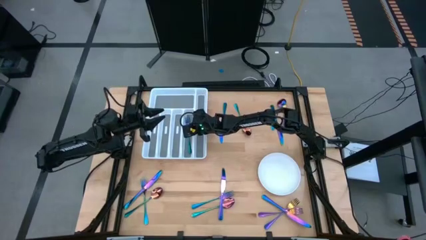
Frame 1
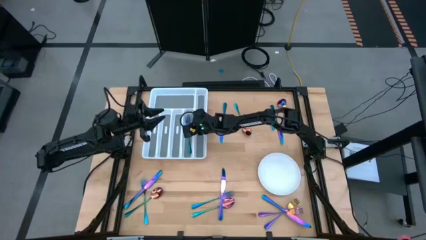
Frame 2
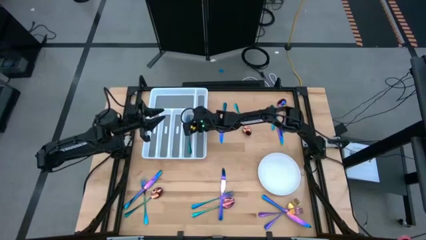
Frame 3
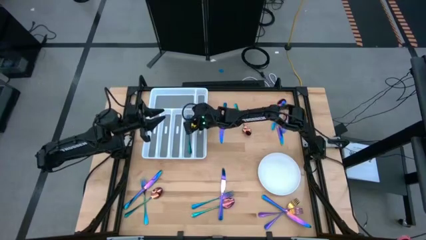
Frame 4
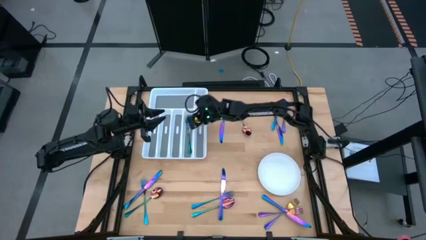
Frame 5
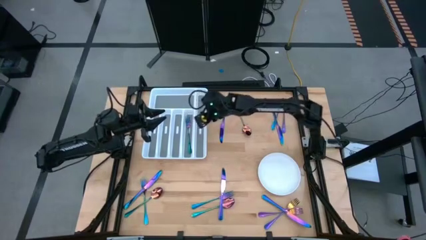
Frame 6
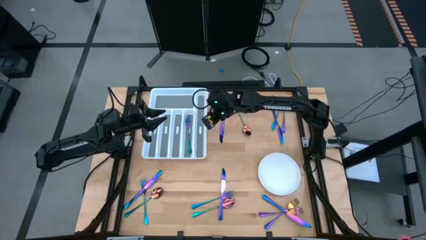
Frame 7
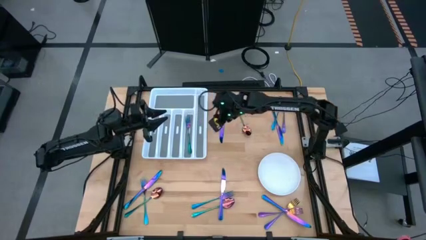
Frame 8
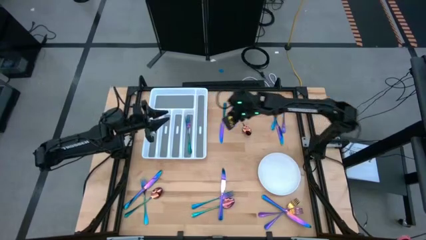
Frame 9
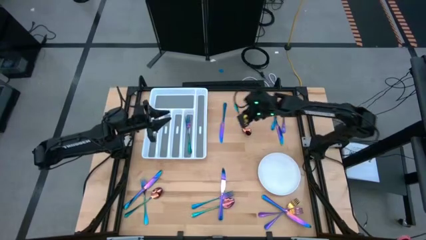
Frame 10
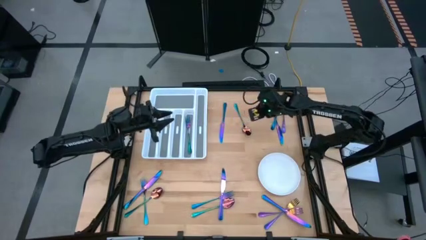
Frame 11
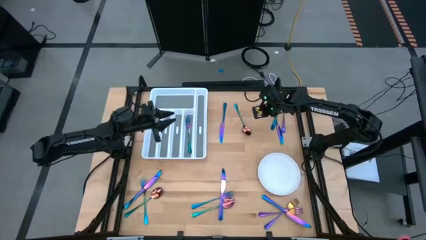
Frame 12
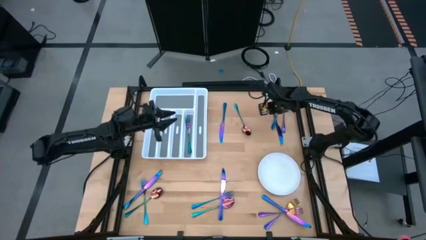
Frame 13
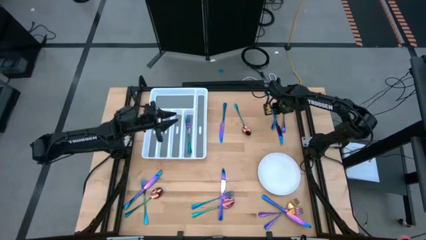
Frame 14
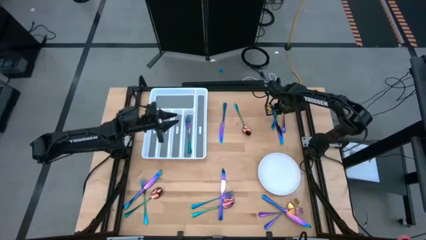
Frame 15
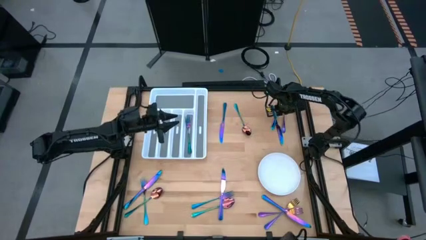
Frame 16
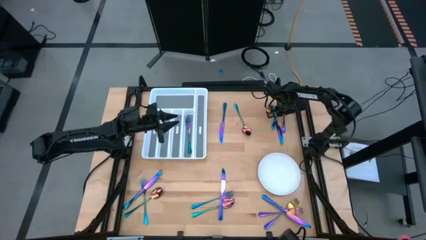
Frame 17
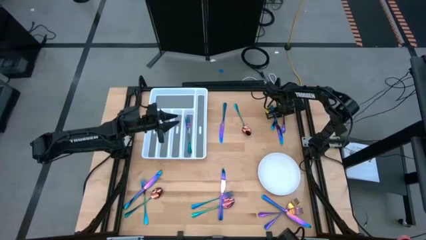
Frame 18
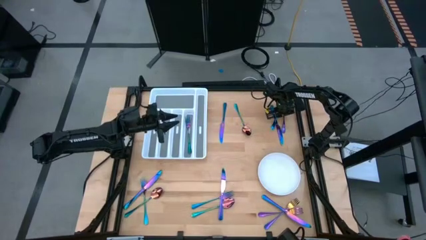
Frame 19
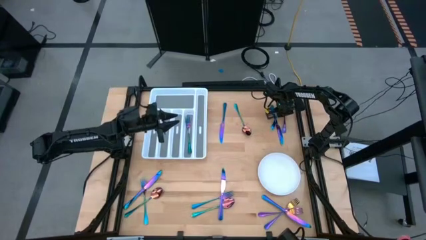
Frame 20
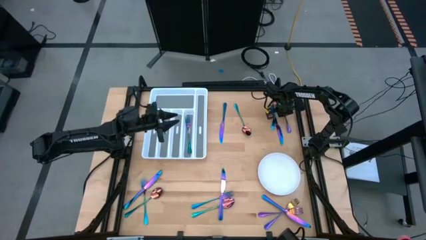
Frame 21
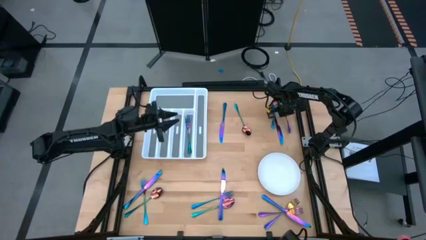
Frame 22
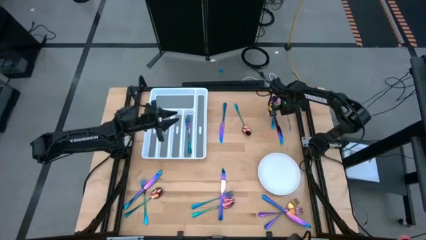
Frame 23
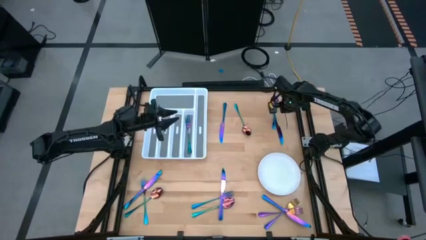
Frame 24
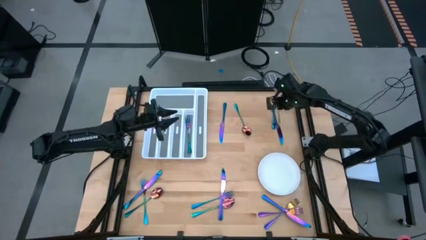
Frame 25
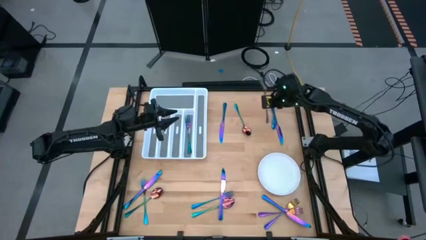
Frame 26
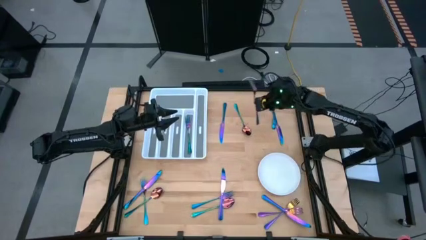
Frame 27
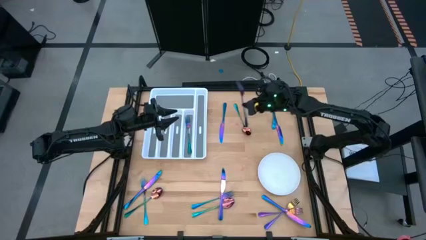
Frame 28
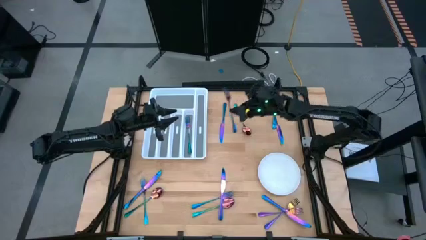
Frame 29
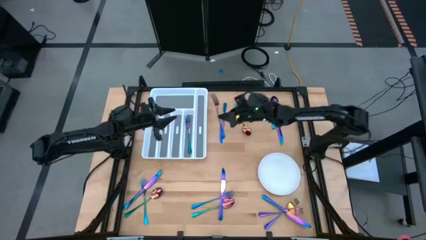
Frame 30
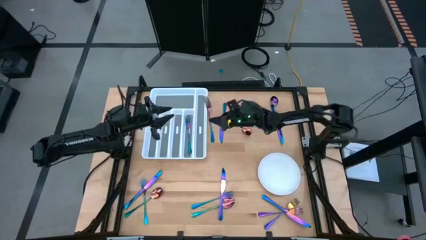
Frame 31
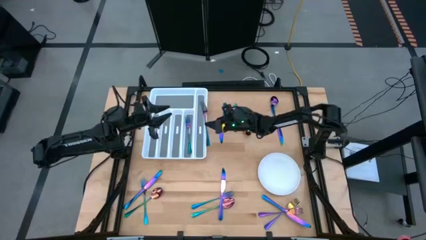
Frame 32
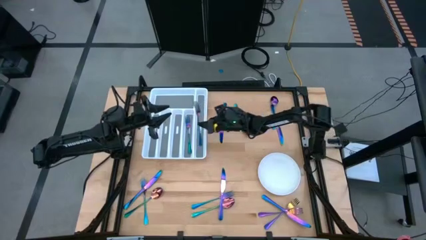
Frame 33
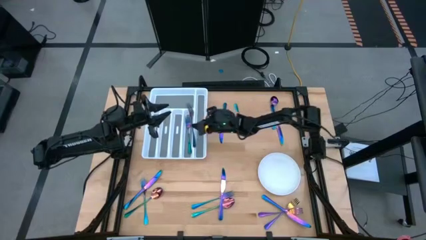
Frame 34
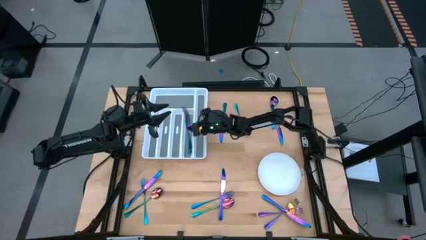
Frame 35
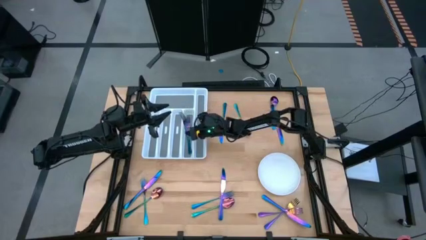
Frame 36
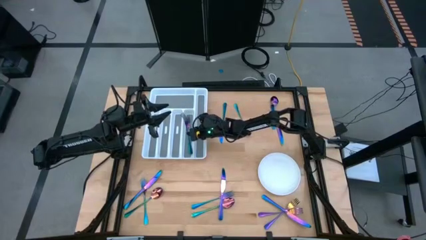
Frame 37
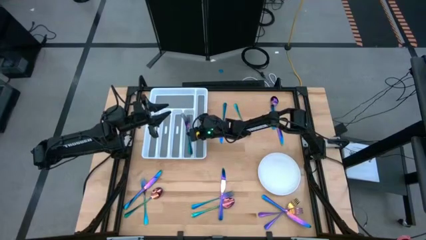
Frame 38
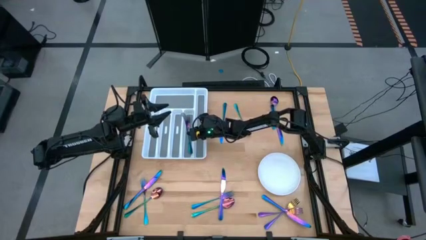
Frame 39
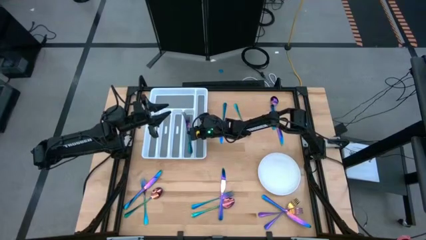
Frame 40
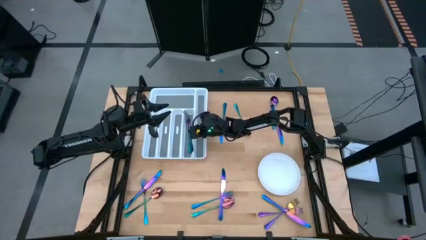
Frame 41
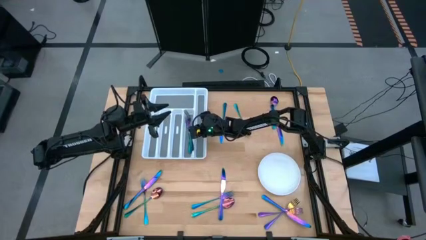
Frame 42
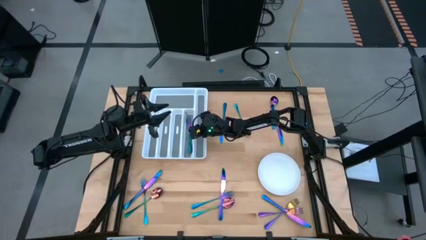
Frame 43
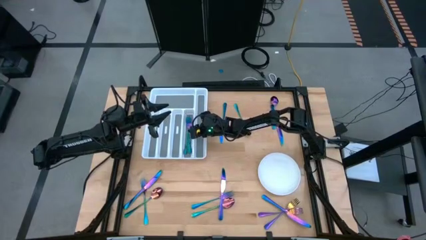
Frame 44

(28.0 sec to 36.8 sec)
Task: Sort silverware
Put the iridescent fork into the white silverware tray

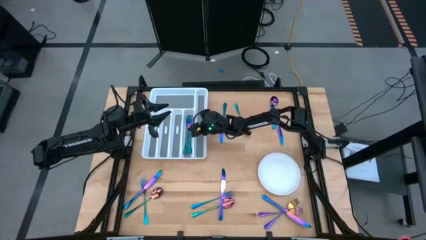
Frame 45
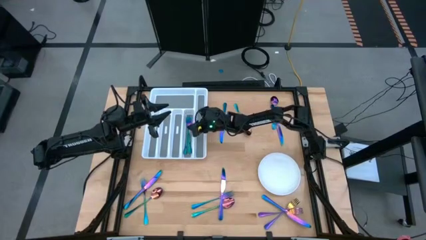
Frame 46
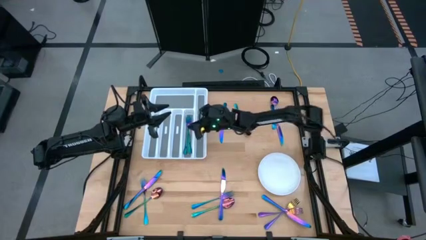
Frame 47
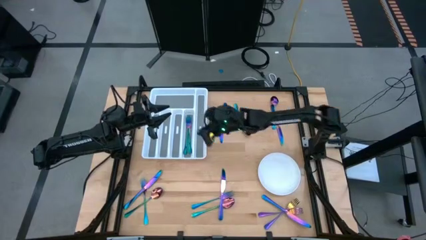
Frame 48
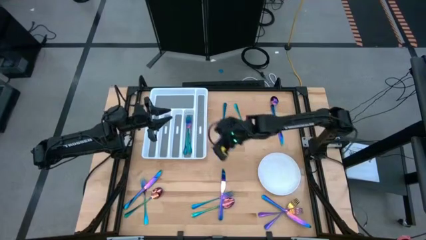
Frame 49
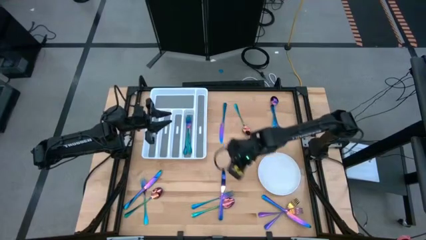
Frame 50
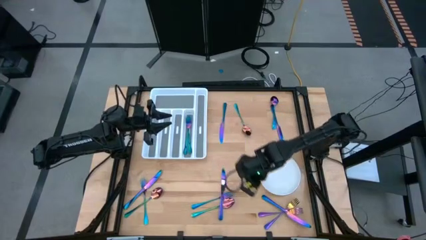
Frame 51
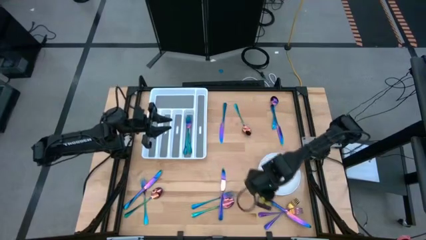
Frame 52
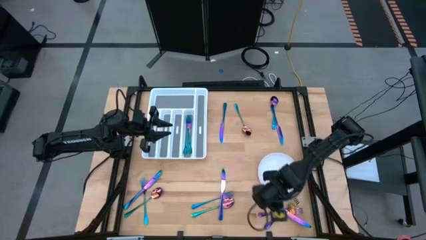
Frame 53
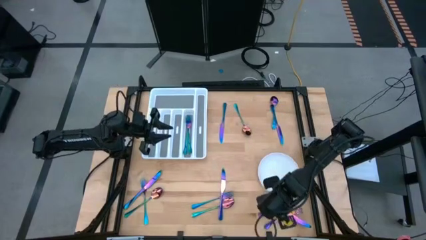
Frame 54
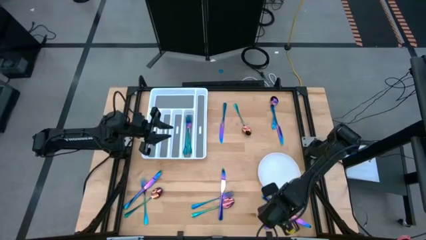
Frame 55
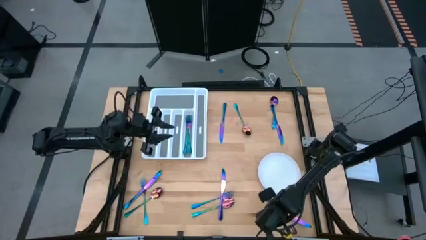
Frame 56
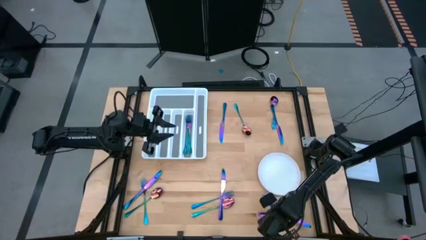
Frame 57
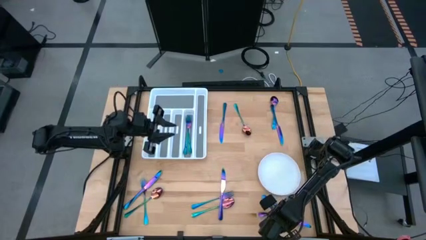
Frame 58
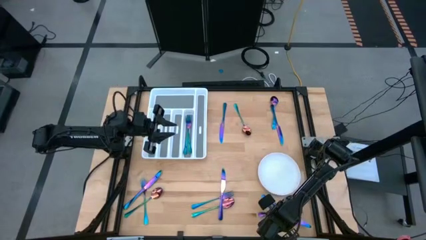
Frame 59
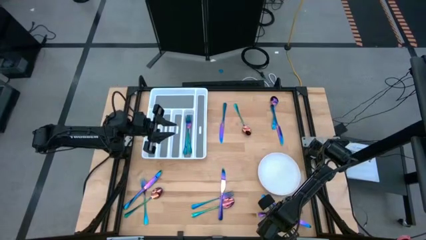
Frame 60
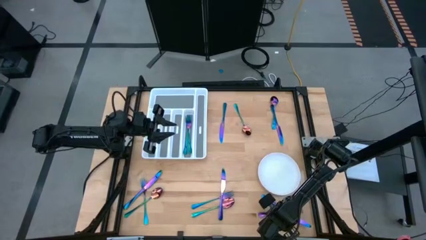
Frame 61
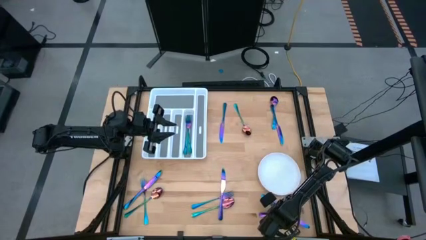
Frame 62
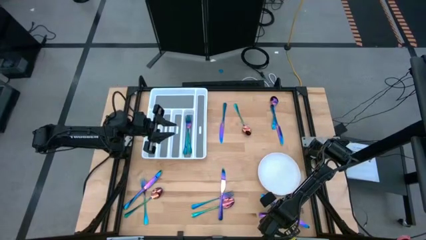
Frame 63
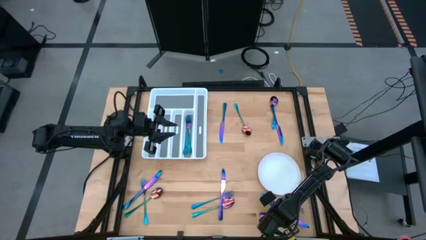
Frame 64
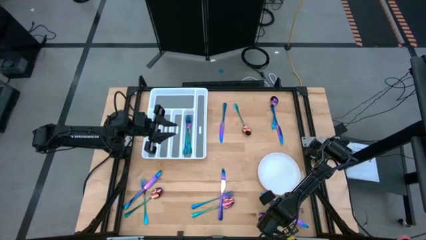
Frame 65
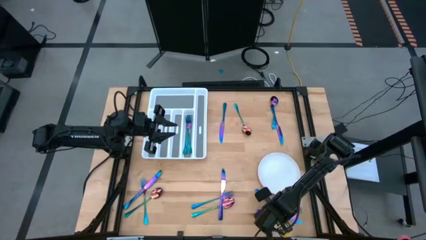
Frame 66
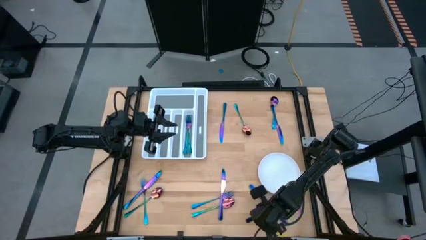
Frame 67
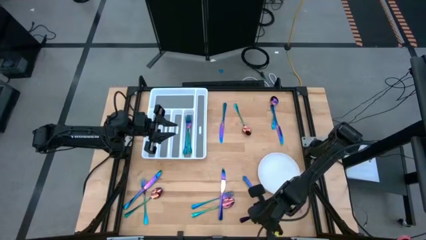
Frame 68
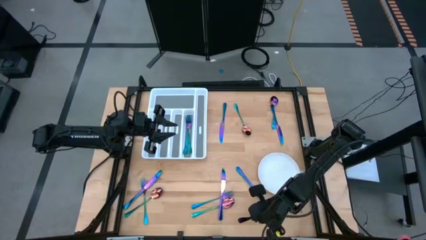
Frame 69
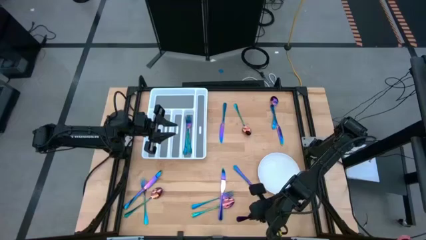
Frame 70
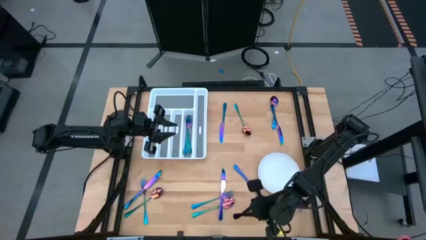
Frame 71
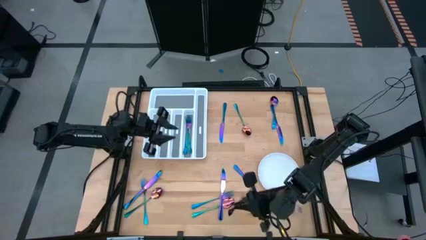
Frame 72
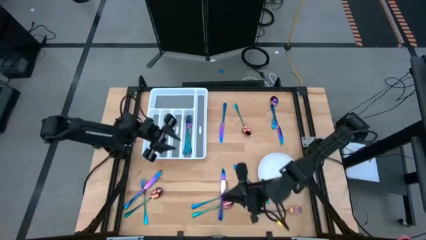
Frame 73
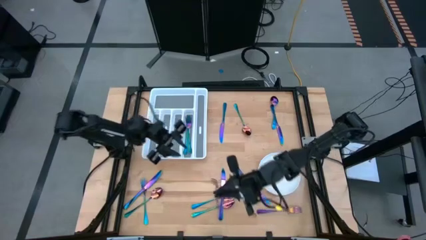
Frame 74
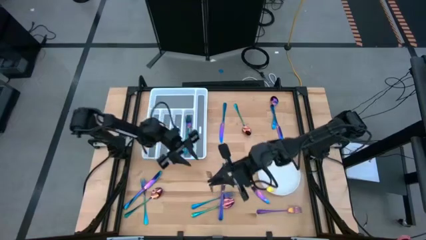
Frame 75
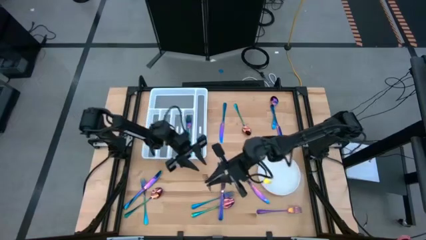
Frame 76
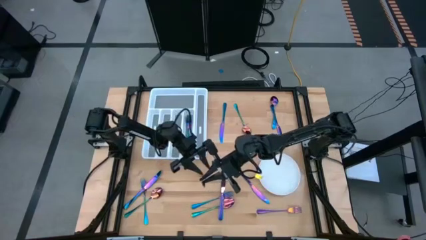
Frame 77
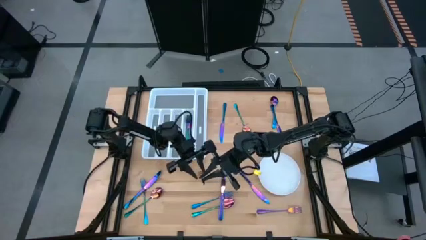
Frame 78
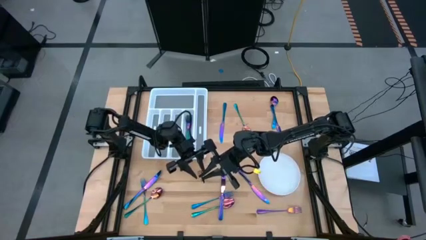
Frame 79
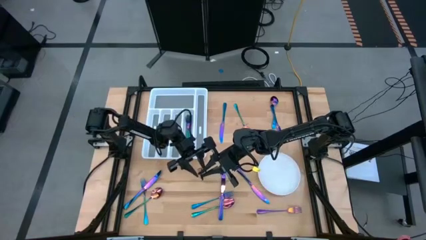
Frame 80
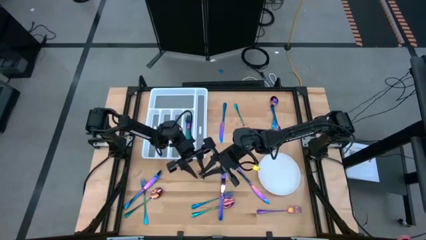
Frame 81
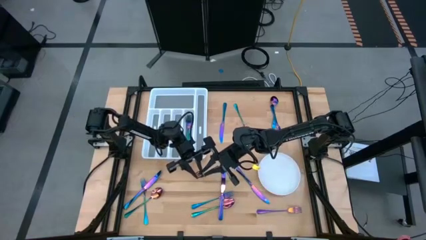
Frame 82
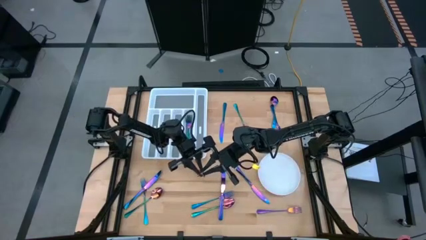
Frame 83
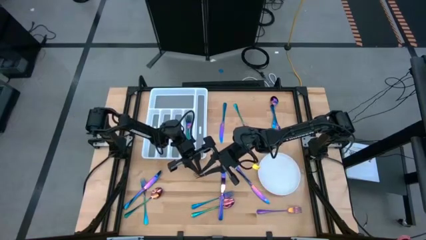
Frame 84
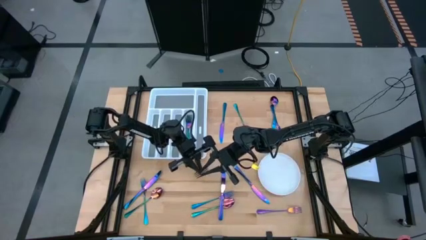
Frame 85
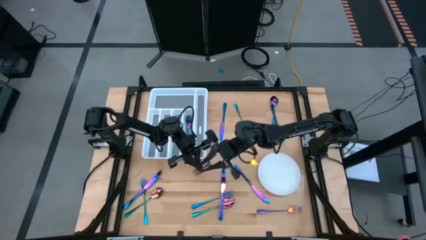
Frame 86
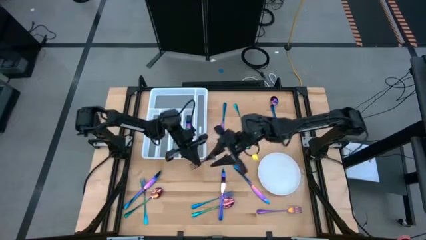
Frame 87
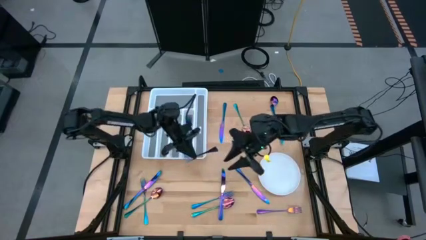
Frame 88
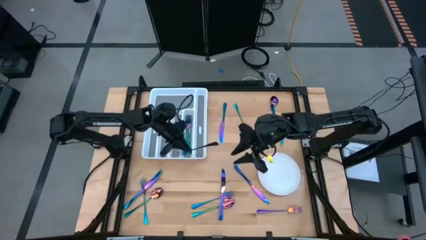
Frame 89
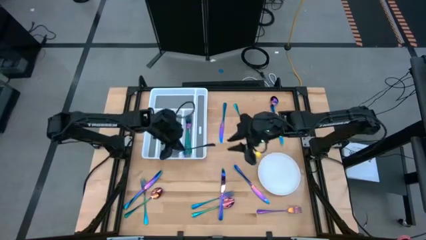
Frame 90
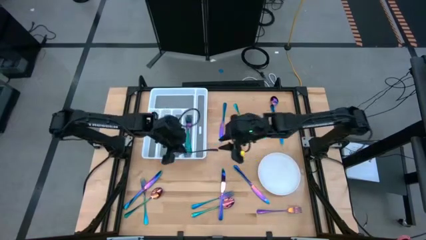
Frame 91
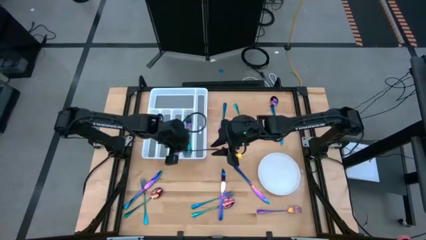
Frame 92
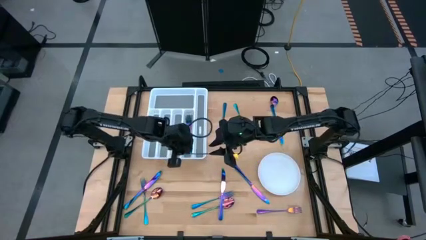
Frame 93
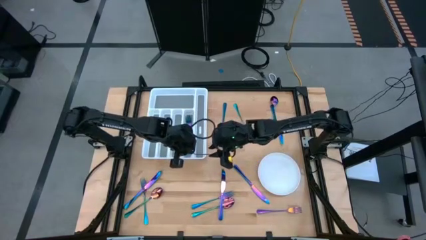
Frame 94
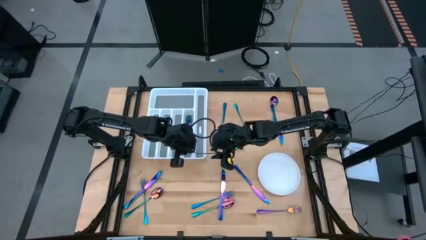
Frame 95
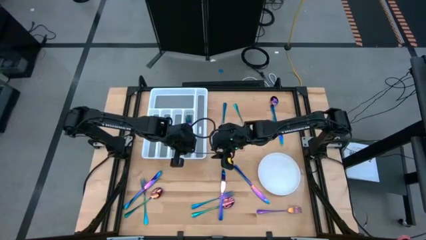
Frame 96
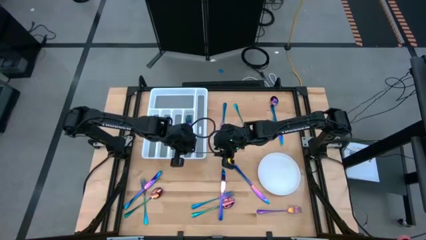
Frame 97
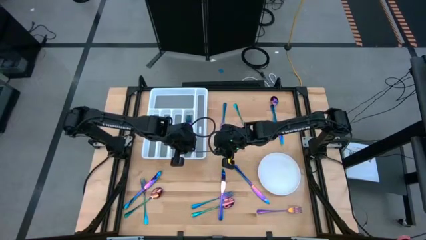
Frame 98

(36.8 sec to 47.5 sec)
Put the iridescent fork into the white silverware tray
